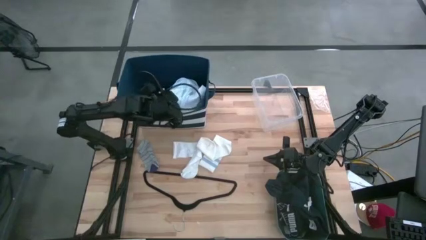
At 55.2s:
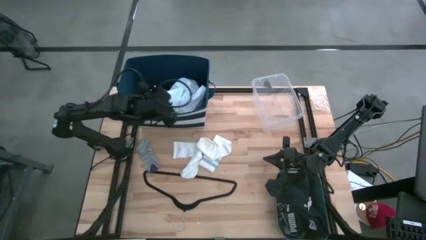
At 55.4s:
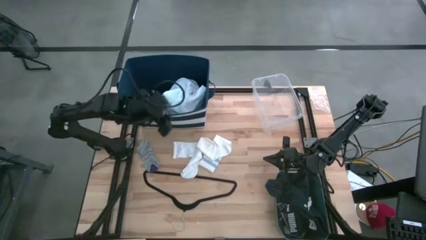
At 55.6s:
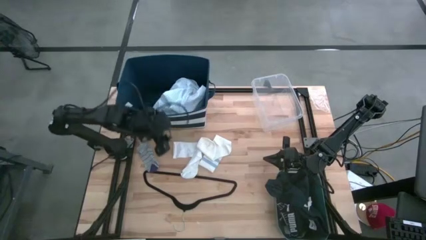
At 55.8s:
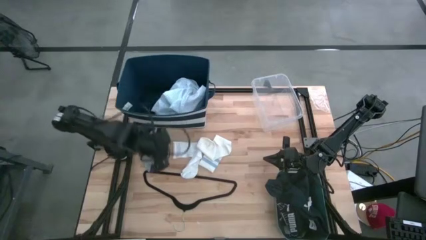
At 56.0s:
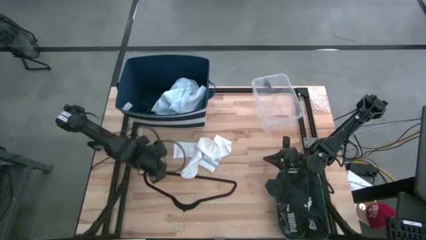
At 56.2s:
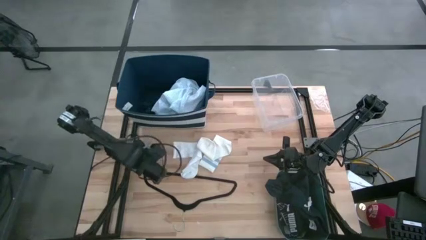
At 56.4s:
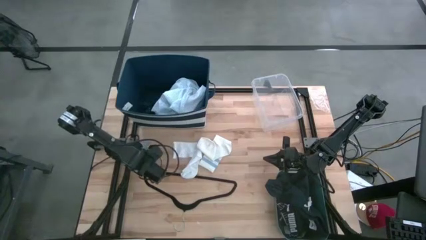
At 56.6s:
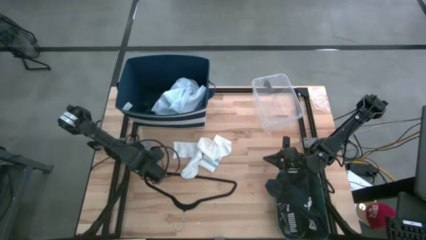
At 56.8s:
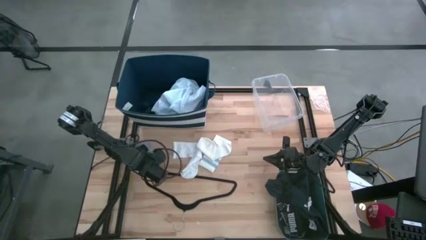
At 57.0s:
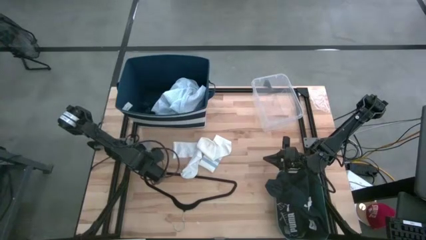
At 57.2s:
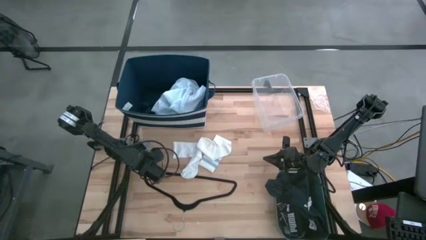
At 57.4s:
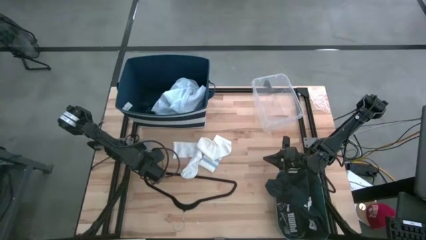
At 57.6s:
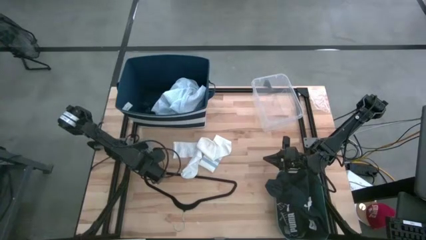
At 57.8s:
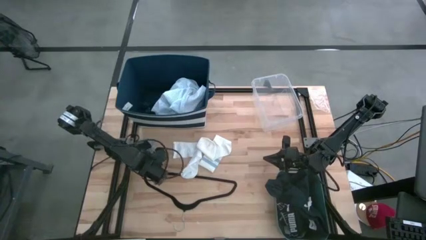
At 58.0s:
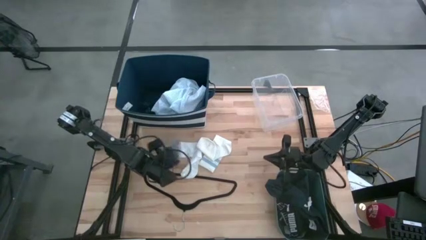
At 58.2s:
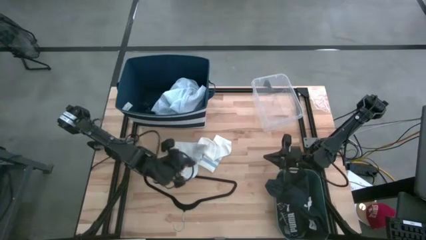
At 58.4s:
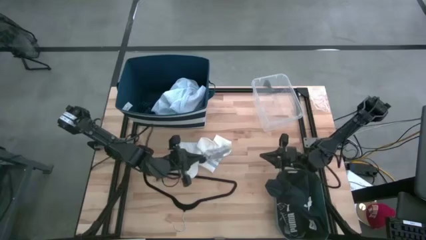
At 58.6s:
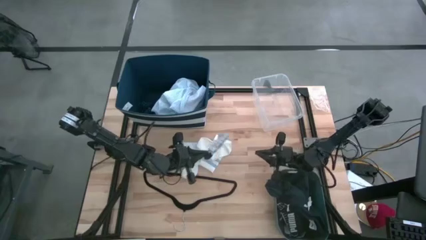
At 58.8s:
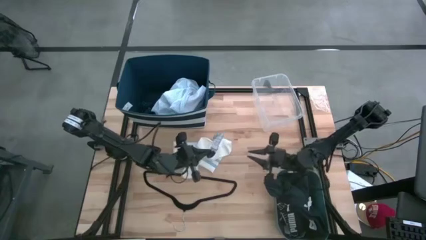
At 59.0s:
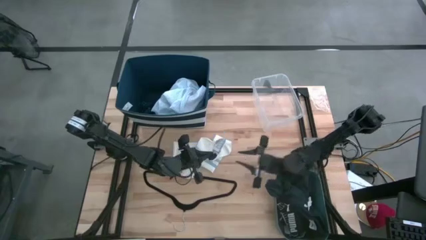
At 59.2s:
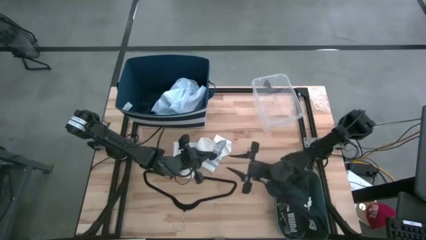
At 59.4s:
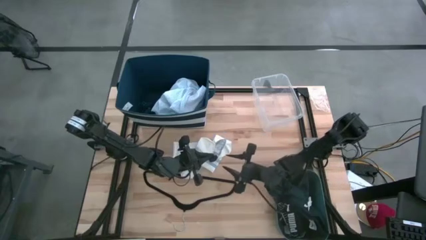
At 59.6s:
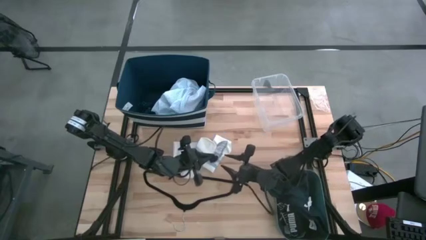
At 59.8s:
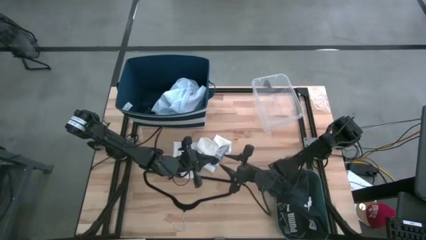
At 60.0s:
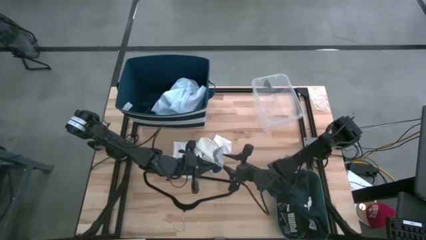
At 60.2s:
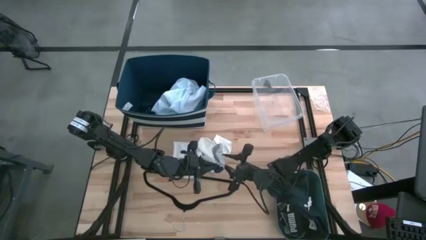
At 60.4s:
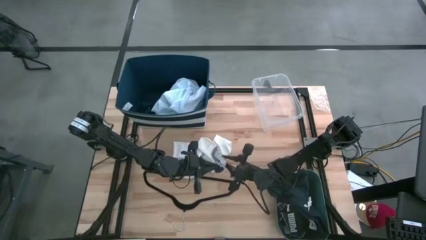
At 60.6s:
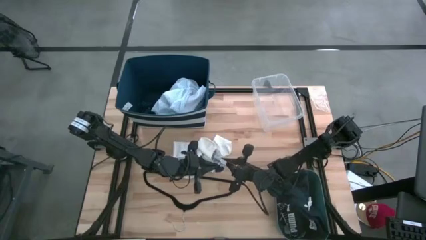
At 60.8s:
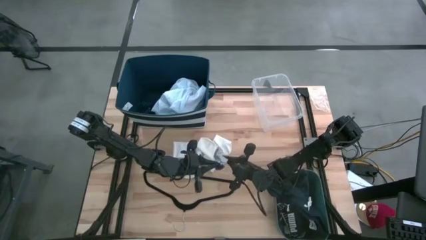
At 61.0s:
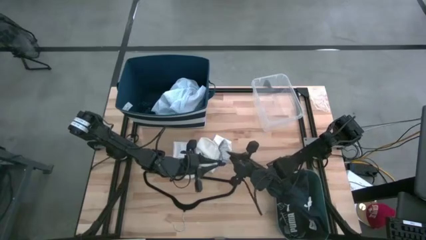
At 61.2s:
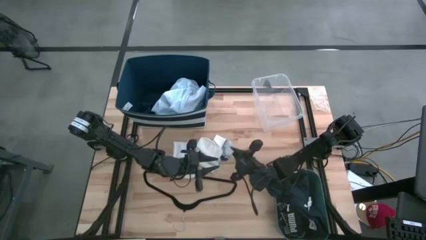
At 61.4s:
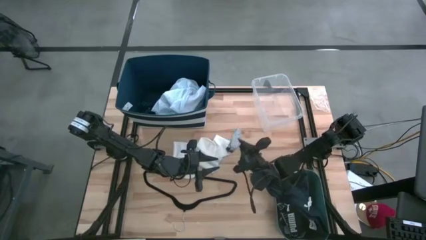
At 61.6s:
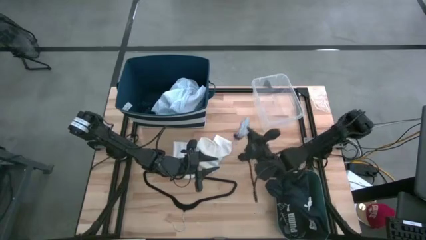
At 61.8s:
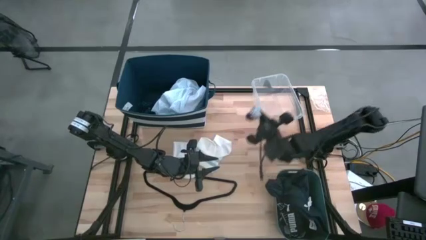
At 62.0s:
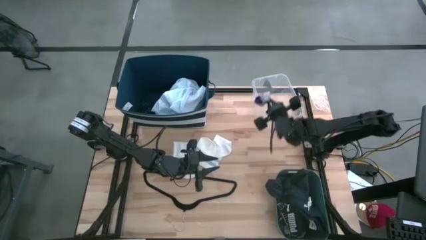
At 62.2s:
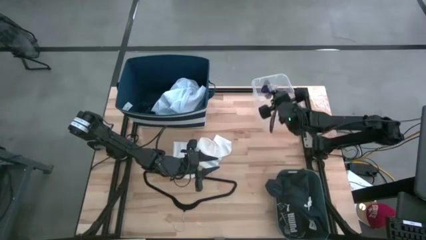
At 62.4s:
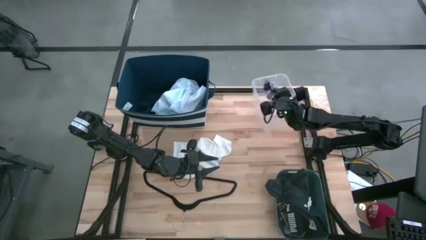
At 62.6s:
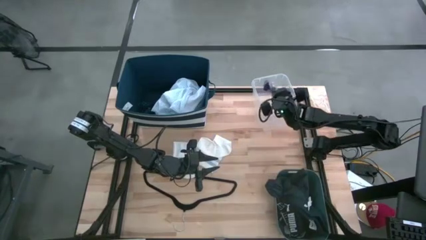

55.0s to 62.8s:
Task: Pick & Place Cloths
Put the gray sock into the transparent bin

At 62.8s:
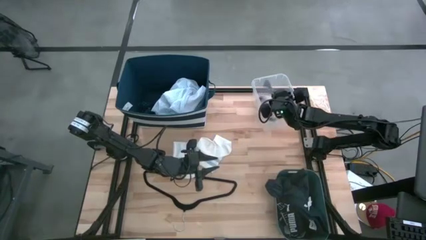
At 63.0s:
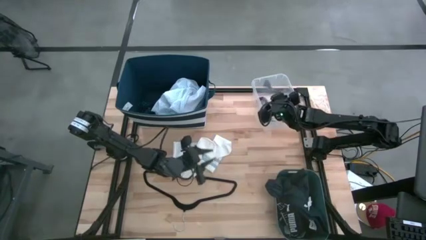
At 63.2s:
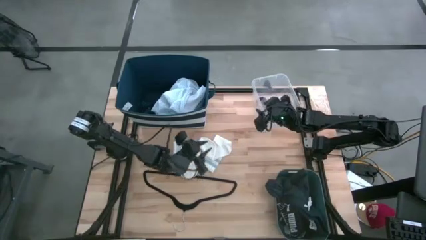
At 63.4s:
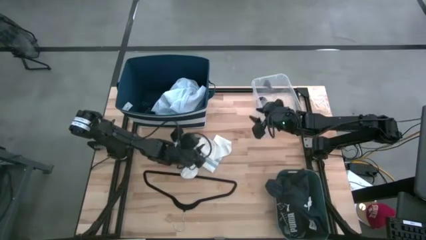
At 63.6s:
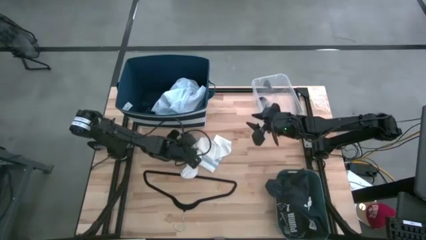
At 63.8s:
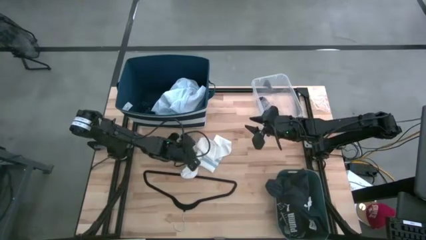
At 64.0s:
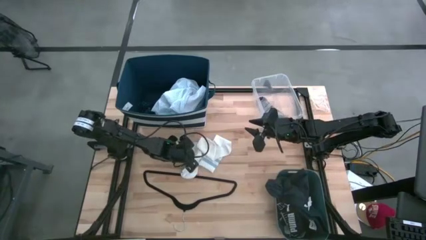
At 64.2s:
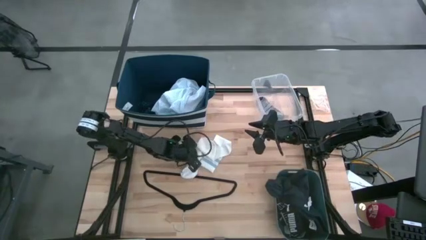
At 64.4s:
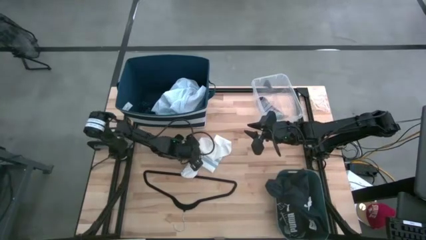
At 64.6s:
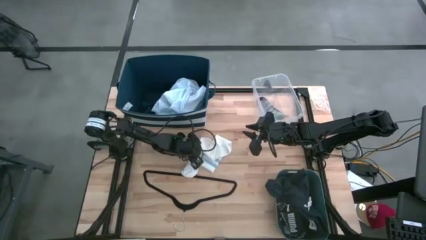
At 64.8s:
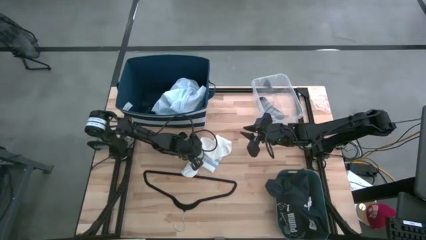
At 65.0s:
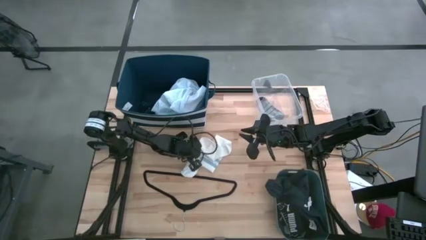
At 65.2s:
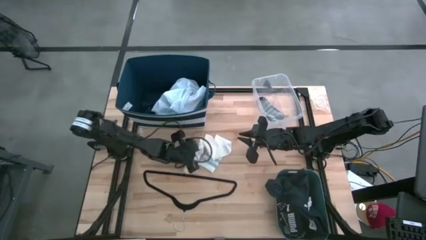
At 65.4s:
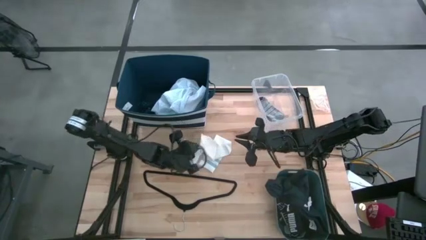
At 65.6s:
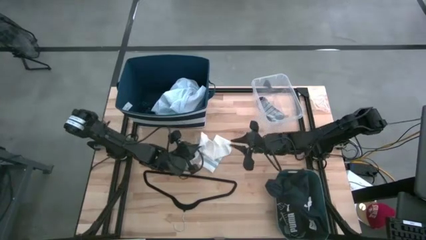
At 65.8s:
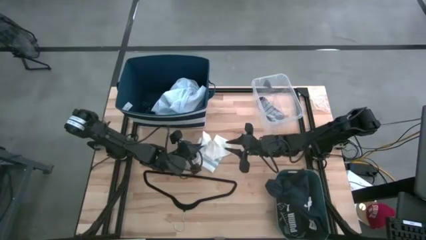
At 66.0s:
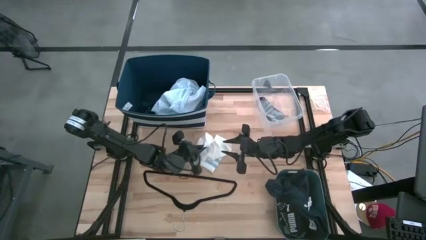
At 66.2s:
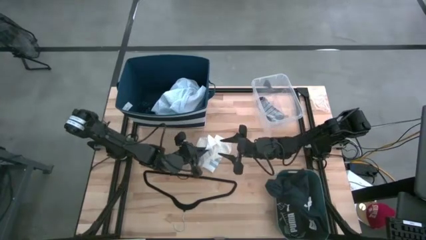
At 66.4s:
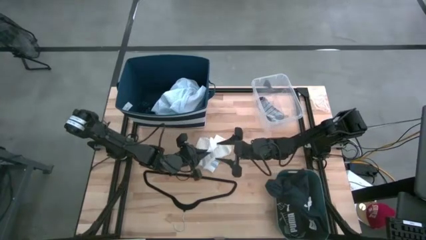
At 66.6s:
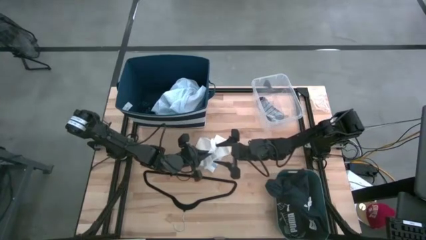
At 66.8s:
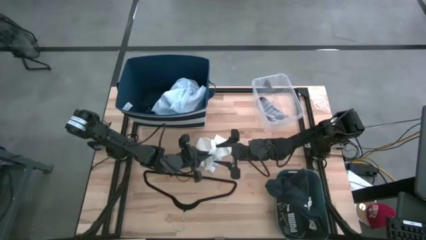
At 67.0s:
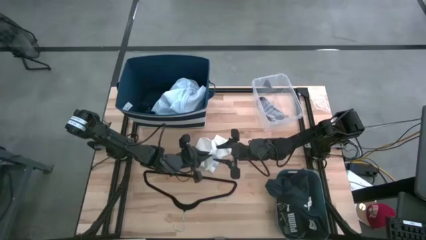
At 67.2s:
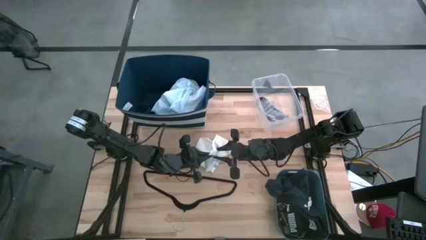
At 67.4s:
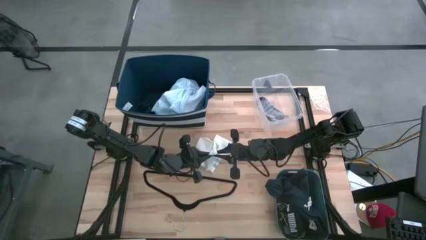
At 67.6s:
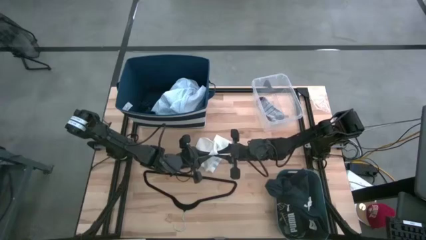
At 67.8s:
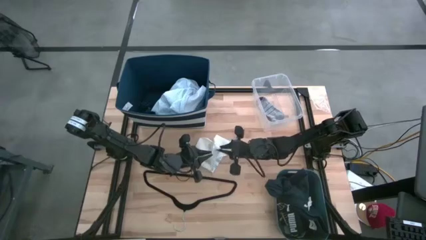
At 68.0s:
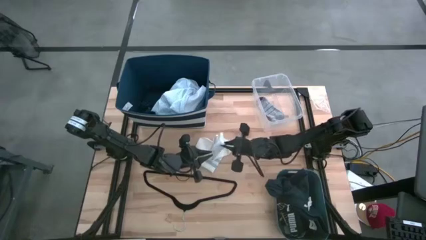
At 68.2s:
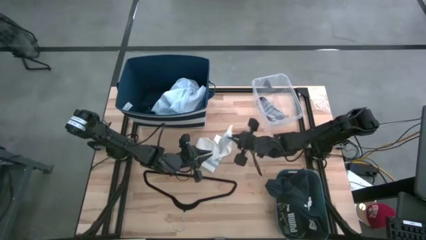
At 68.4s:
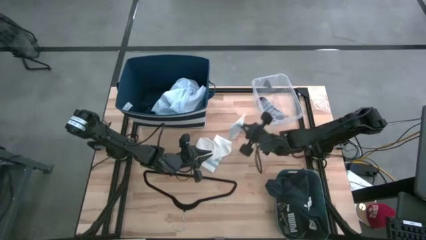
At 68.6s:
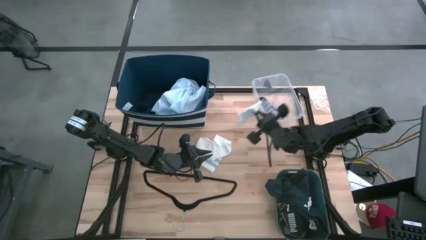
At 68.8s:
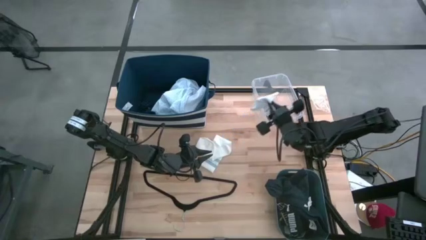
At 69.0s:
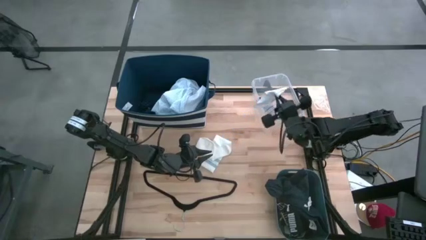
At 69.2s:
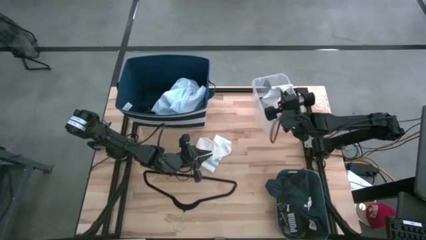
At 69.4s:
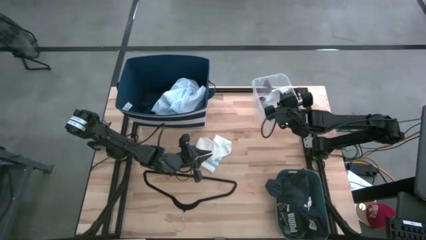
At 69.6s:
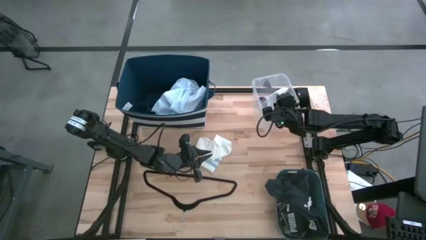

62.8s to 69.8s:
Put the left white sock into the transparent bin

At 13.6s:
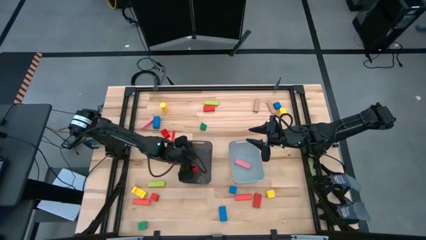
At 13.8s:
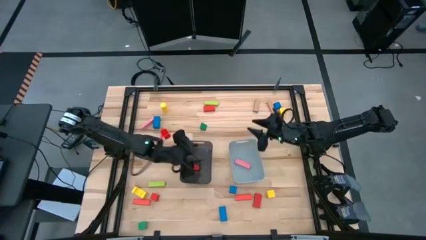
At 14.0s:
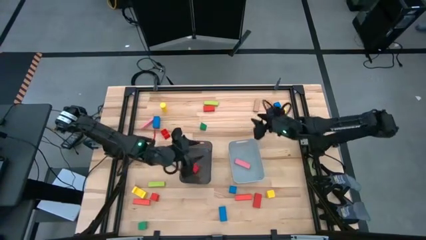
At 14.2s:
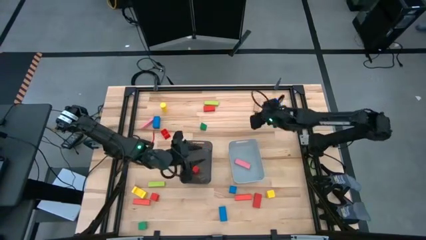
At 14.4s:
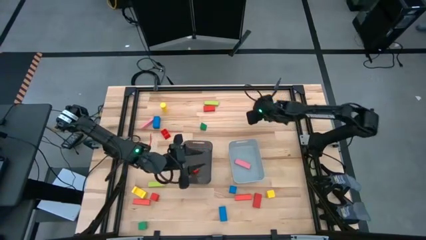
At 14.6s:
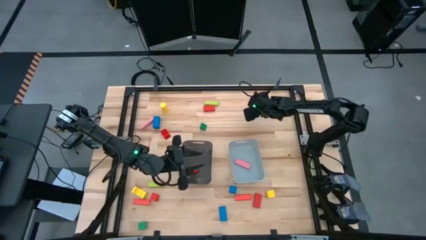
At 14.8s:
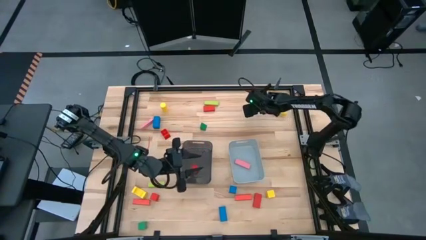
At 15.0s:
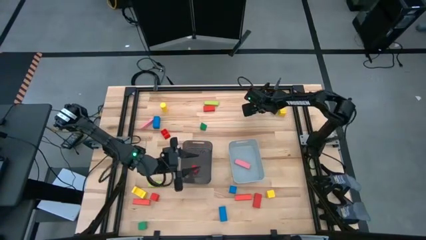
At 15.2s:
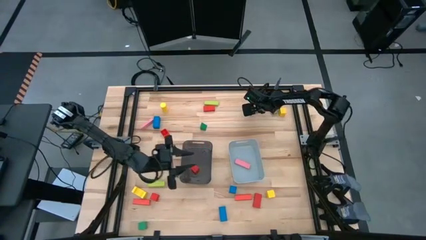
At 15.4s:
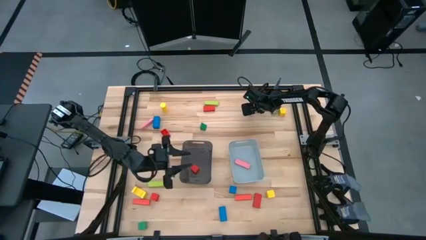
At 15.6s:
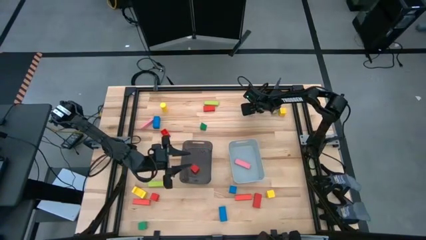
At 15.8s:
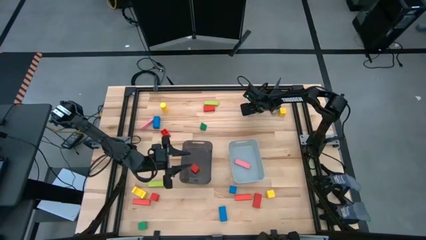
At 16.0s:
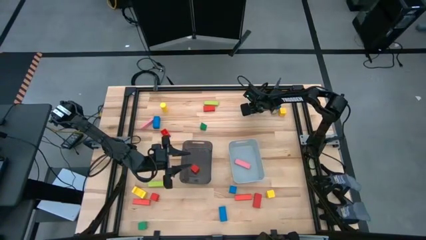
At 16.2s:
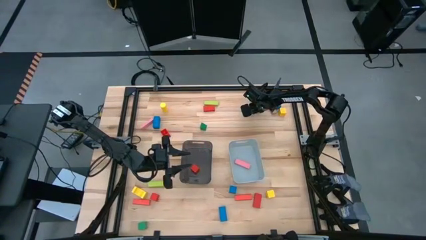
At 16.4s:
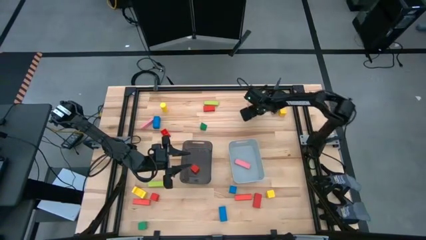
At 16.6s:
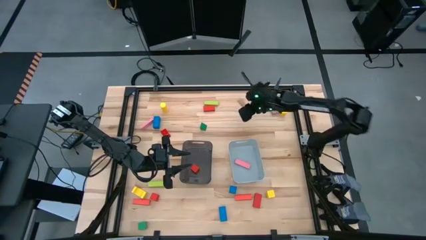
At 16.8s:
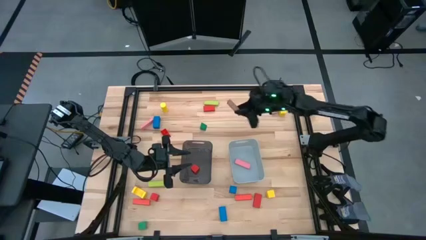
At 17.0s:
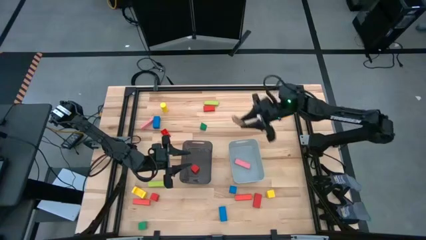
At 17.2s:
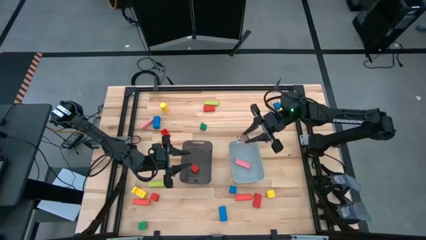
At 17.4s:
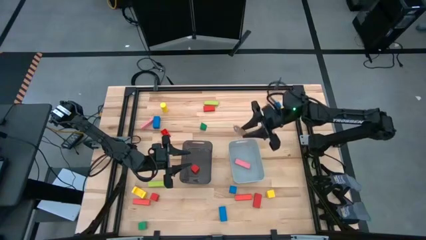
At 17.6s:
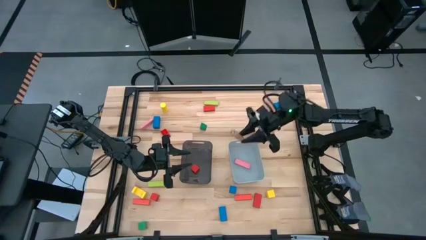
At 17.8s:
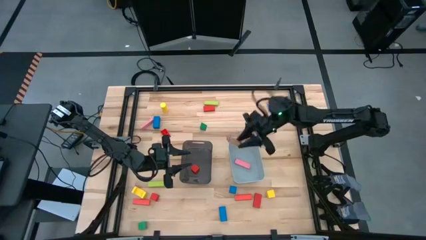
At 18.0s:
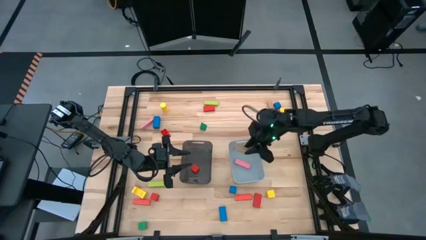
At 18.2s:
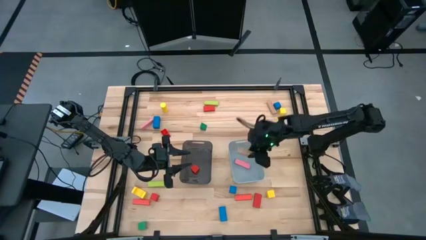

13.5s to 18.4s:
Task: Sort blocks by size
Put the left large brown block into the gray bin
